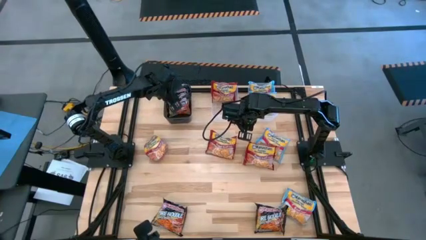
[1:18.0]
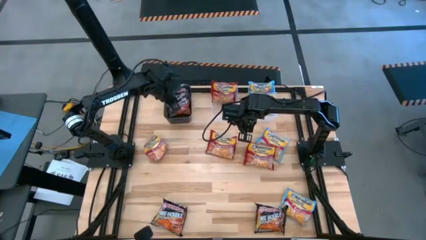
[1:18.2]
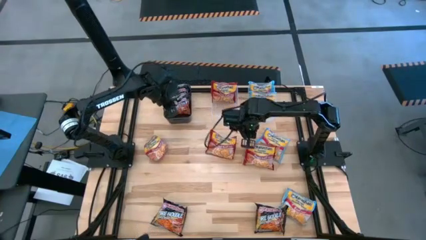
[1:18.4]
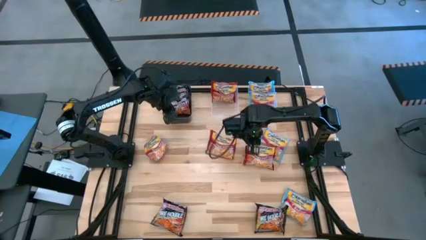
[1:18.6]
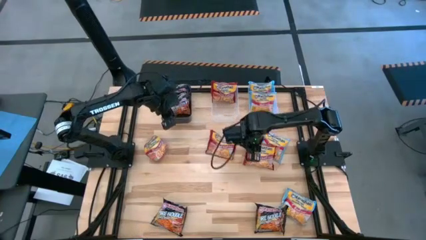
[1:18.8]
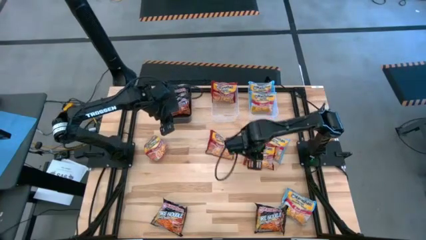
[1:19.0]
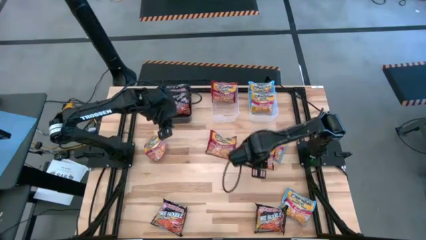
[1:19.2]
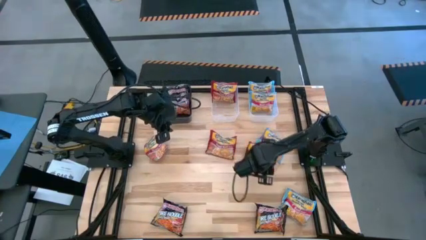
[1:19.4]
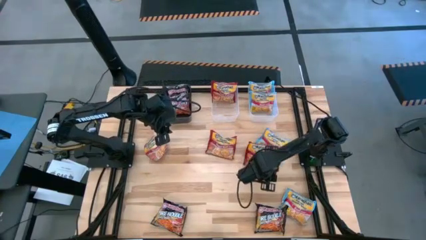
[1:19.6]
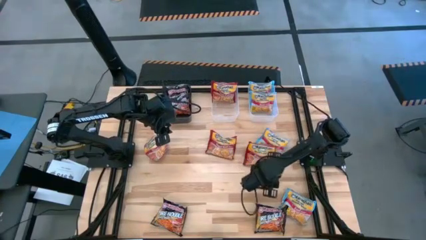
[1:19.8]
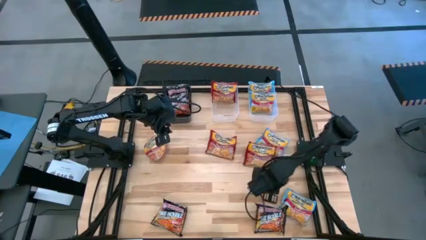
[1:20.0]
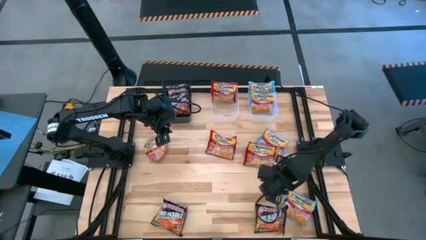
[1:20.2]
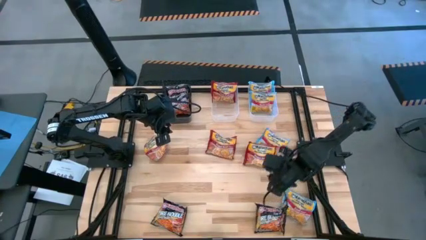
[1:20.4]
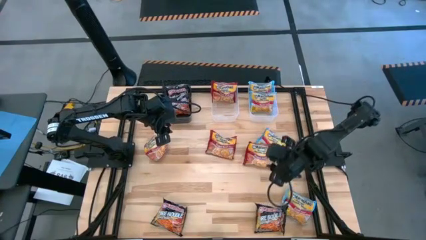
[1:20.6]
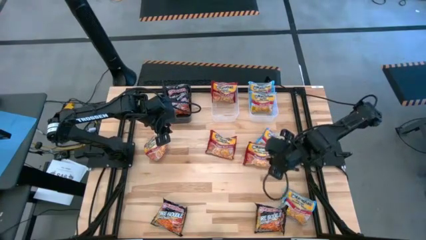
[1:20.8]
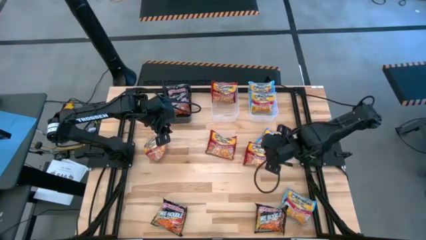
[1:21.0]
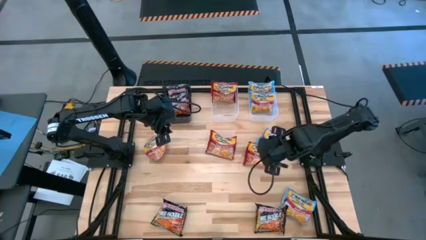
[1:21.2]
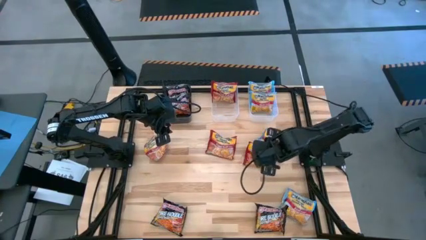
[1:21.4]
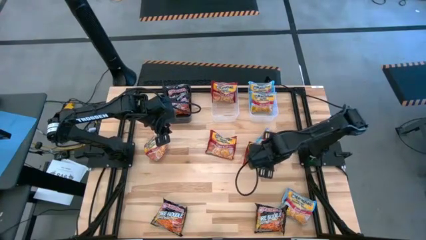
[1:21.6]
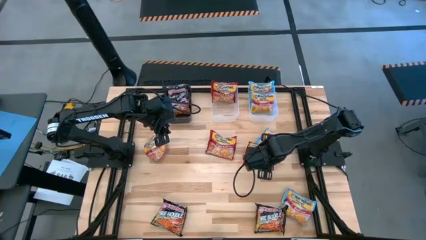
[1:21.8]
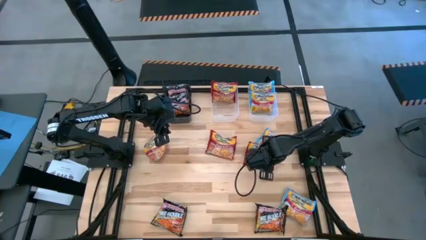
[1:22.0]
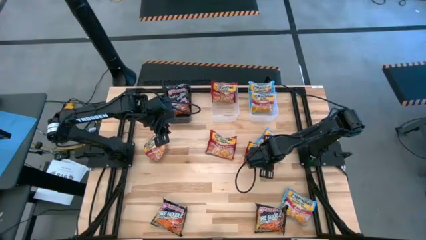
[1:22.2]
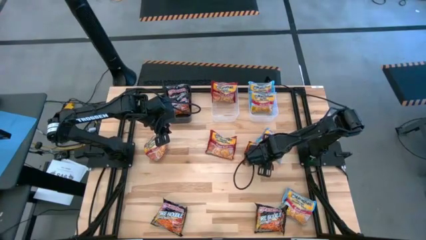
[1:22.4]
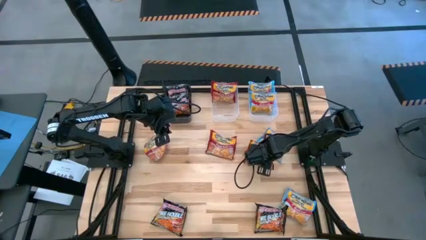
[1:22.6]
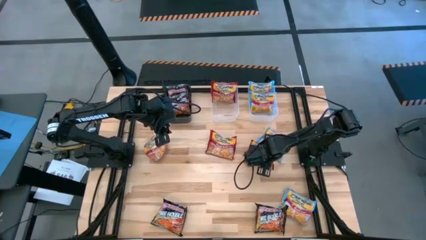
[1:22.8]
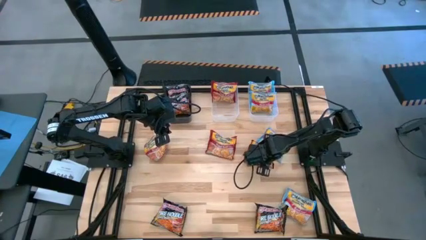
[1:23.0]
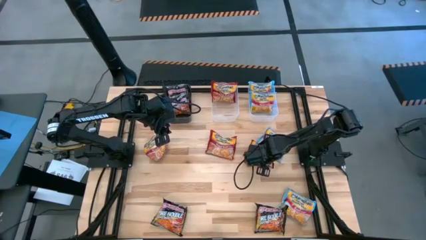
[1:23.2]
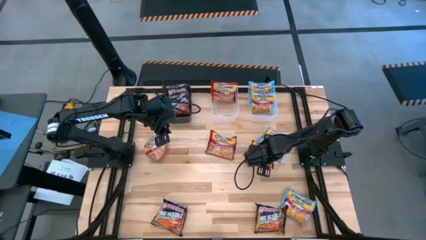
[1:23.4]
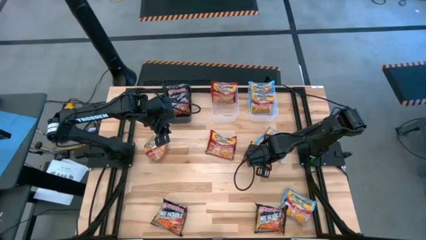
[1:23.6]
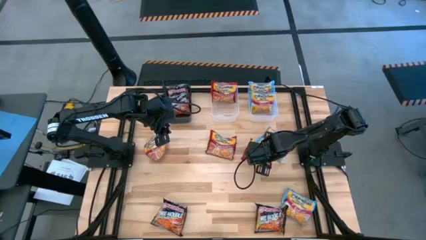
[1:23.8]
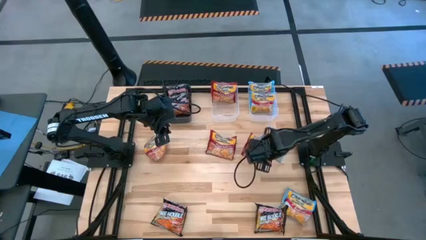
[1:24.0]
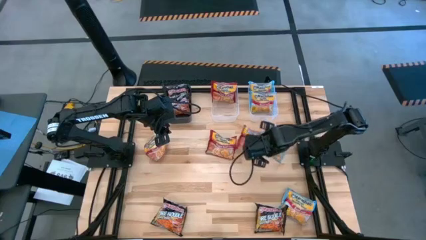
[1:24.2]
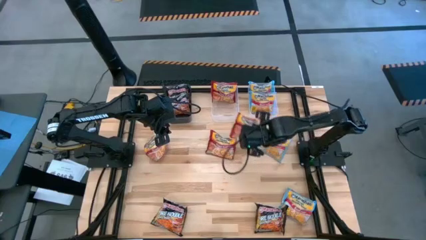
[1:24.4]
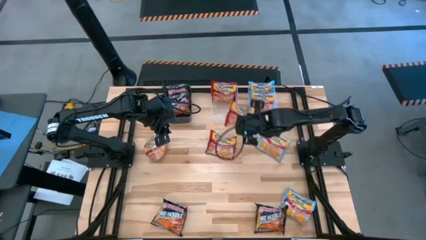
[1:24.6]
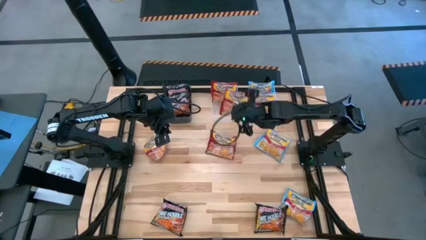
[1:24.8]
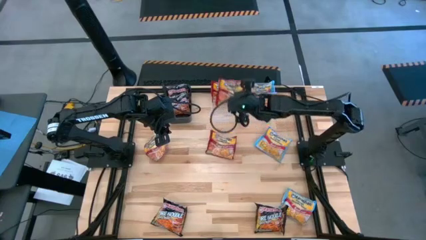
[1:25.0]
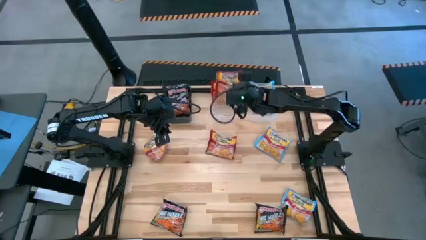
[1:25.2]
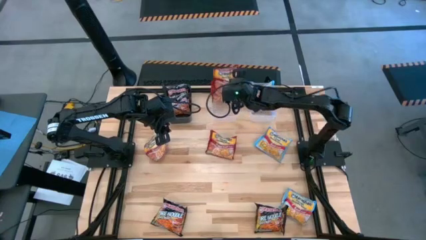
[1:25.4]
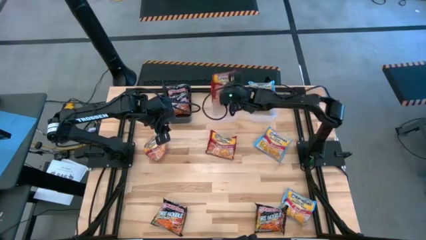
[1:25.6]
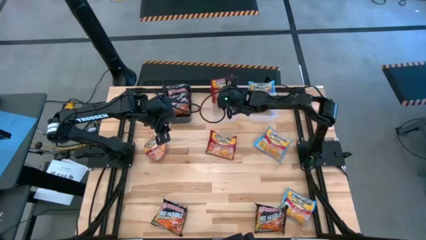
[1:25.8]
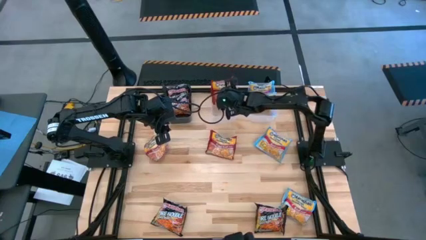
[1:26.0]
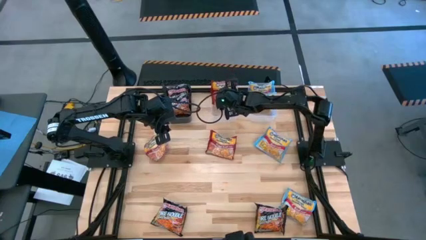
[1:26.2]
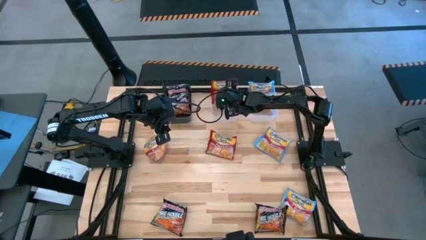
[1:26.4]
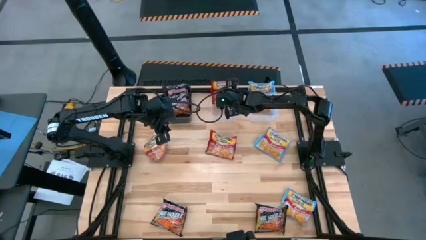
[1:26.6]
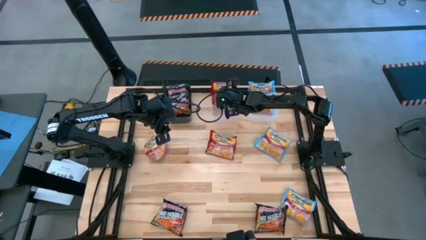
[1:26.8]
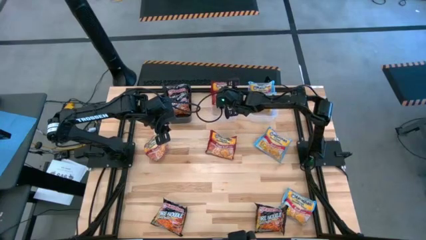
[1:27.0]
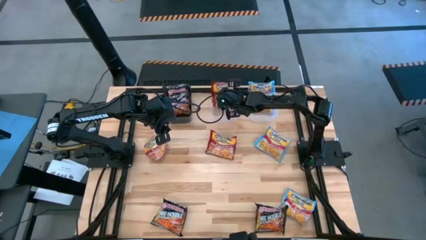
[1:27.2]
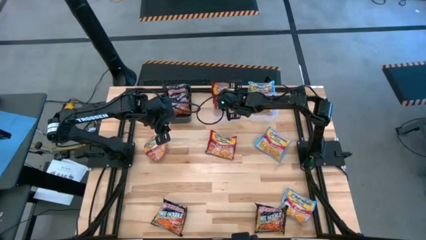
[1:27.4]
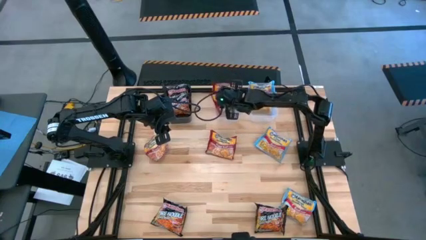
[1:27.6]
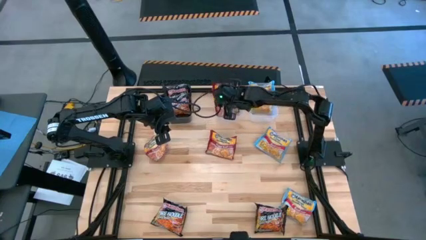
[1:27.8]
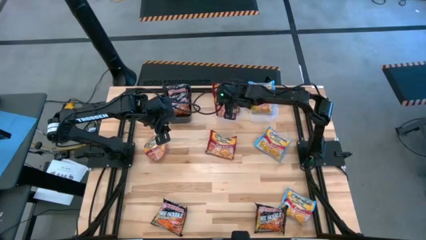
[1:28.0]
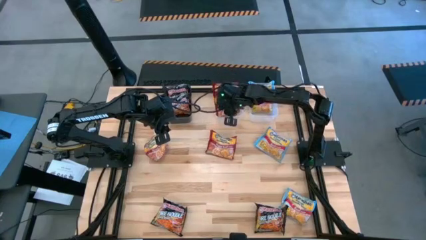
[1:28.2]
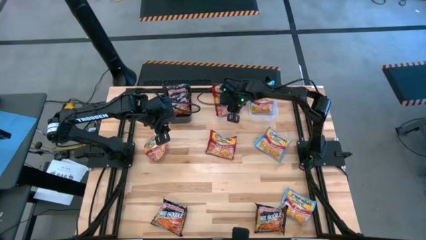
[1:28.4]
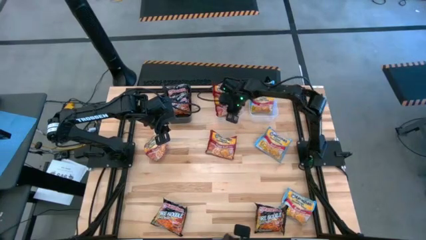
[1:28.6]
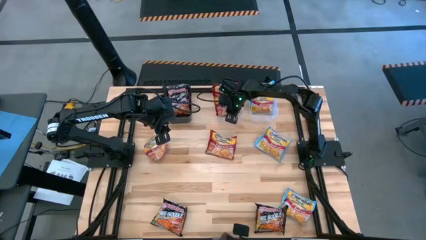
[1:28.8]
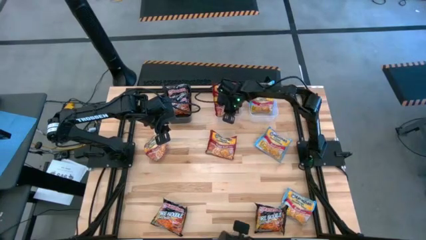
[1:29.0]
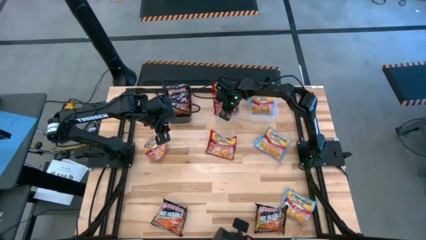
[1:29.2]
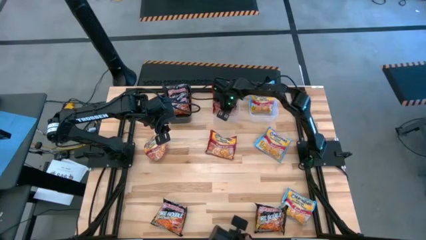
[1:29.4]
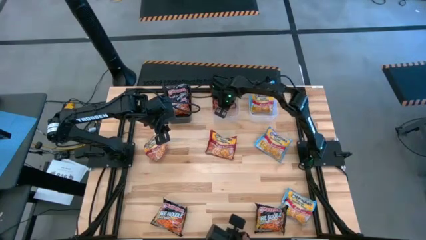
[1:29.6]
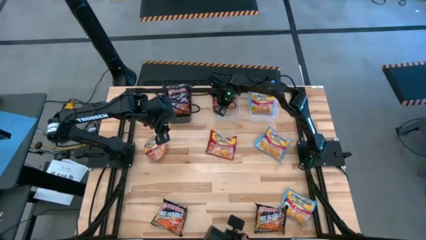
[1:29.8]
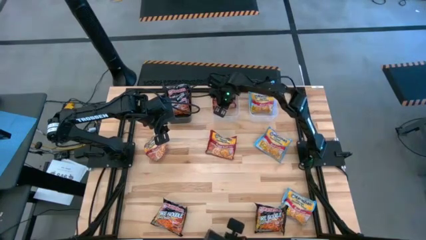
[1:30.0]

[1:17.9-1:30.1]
Task: Sort Maruchan noodles
Put the red noodle pack into the left transparent bin
